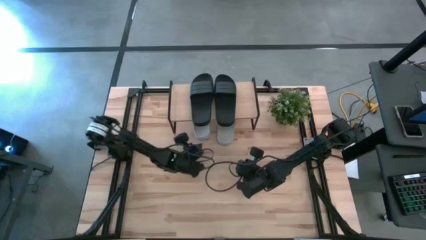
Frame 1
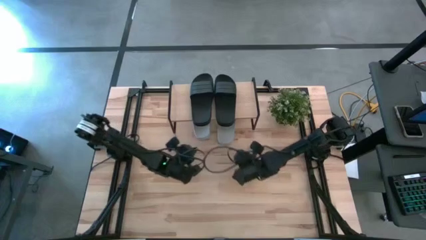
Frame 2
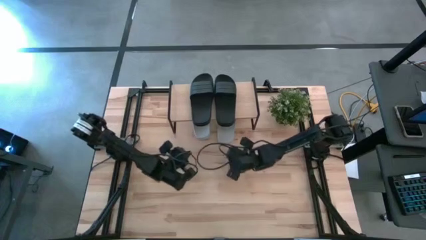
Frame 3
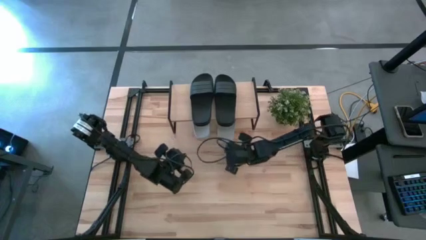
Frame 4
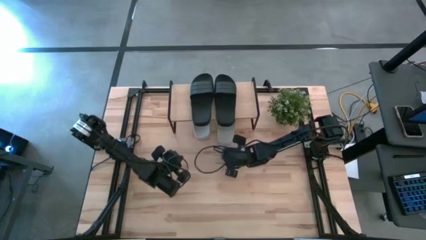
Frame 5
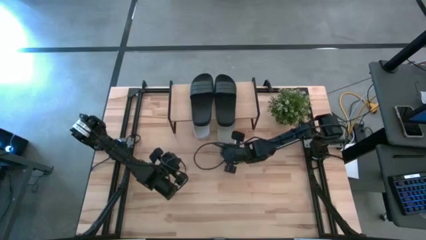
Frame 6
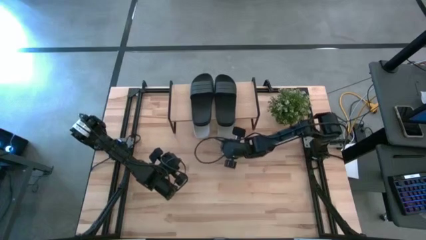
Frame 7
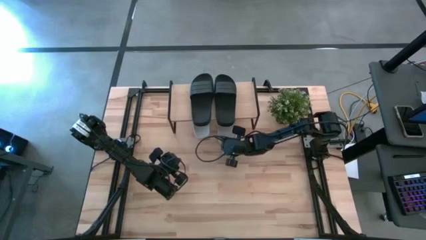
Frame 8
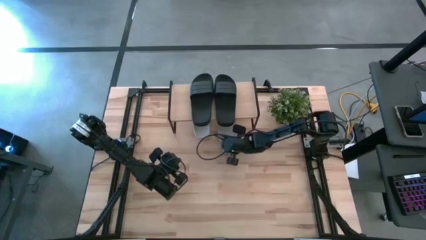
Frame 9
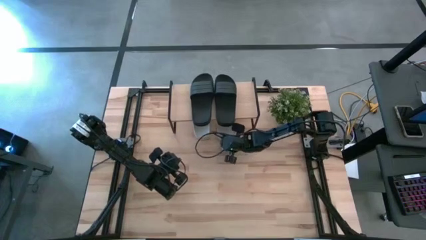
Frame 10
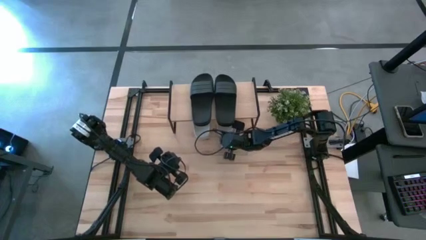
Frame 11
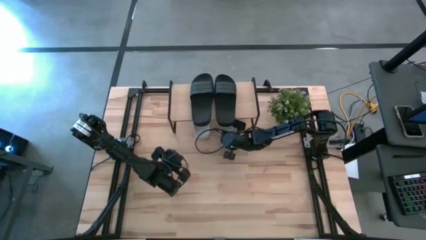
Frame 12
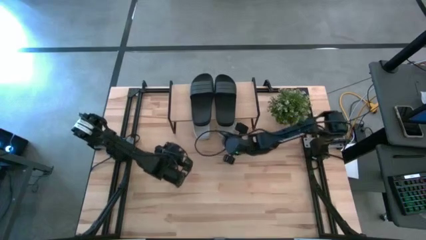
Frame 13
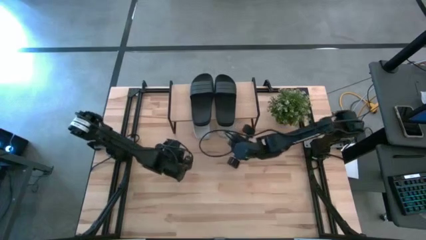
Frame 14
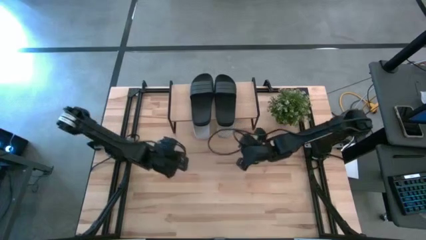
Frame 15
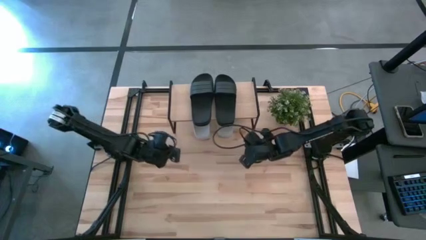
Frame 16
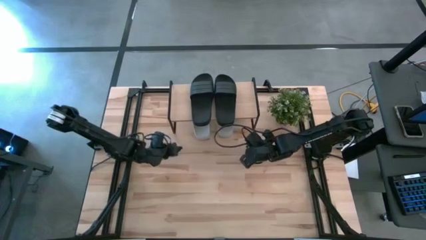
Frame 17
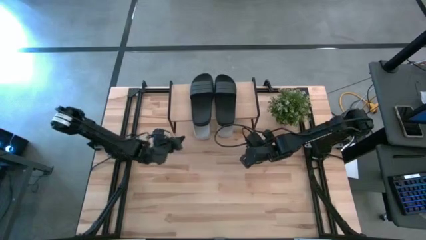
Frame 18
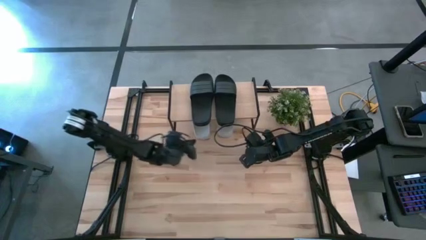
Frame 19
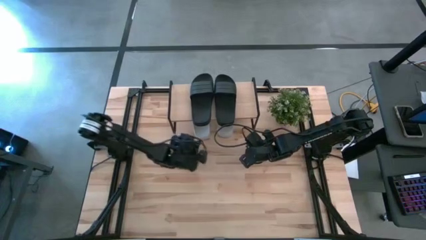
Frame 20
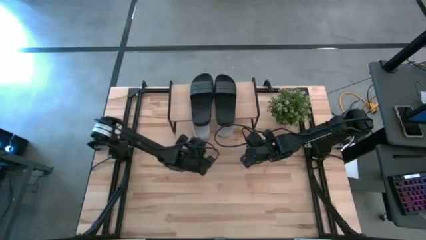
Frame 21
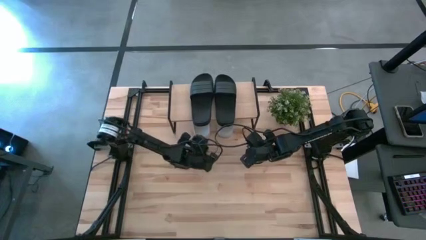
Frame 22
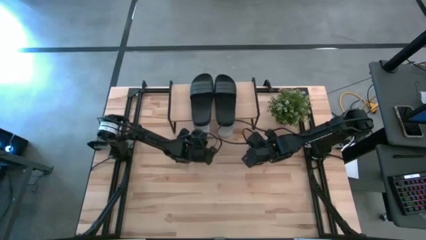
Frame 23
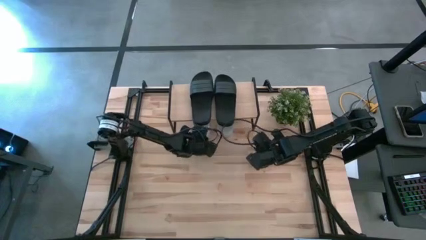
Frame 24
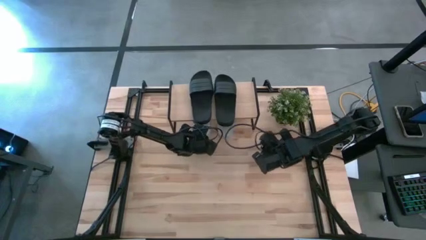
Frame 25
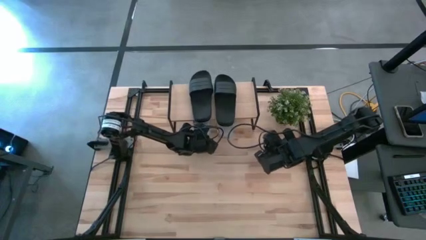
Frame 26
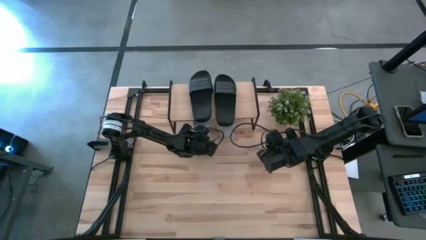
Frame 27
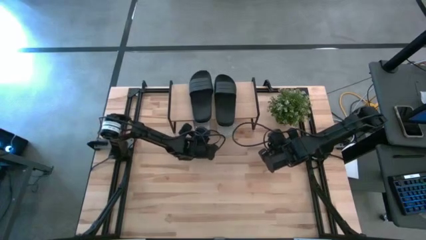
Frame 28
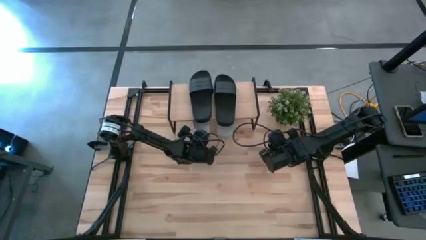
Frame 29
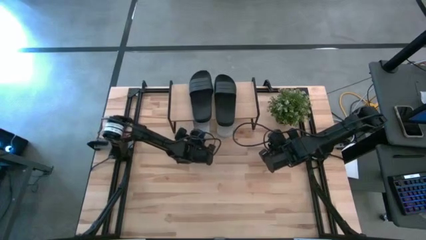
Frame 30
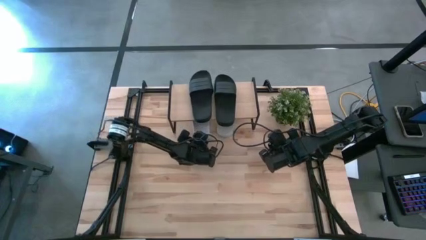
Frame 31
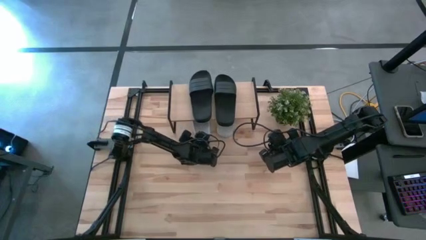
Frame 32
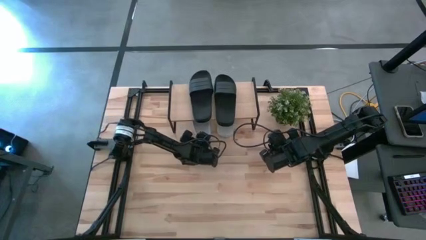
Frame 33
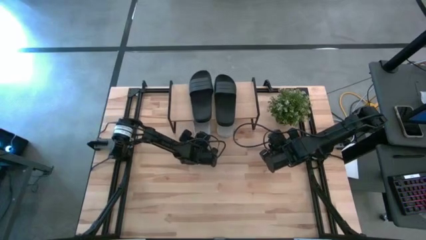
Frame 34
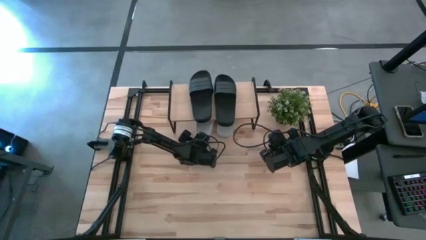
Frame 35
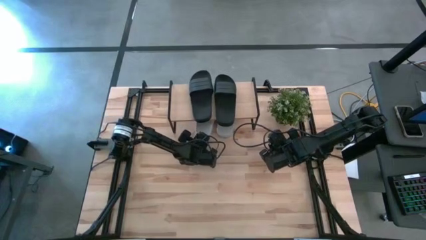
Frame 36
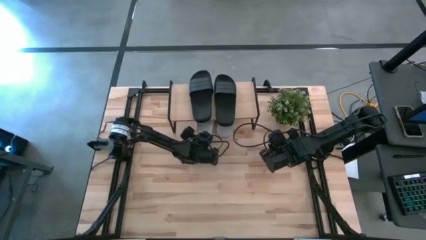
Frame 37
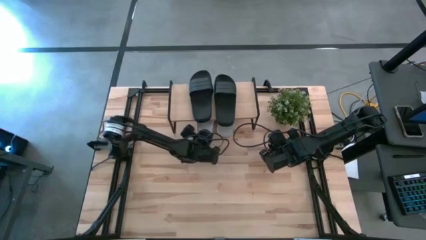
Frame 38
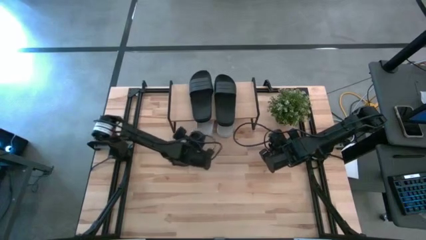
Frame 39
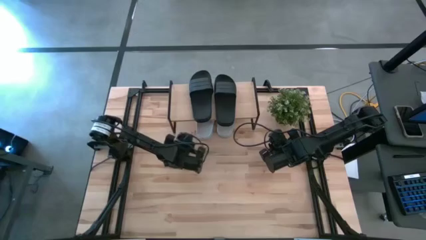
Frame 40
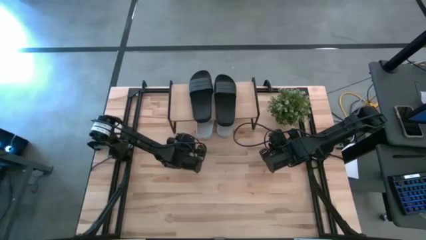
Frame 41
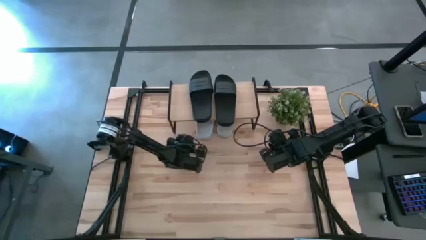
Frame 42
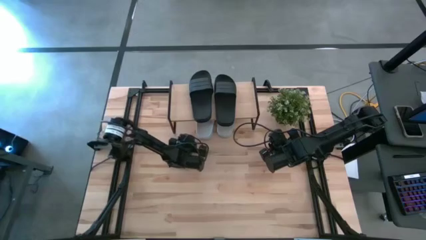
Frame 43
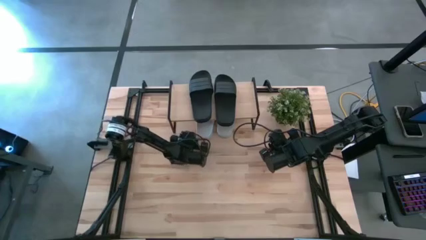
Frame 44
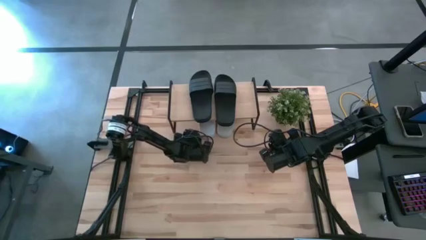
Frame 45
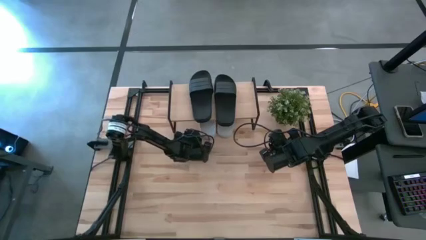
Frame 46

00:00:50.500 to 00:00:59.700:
Task: Pick and place slides into the shelf
Adjust the gray slippers under the shelf

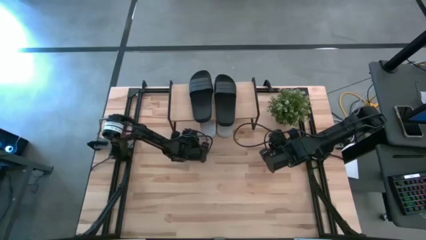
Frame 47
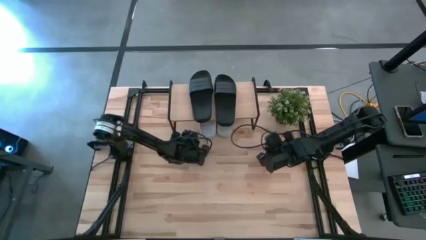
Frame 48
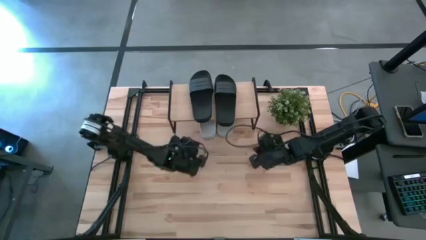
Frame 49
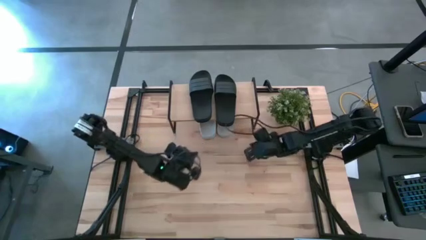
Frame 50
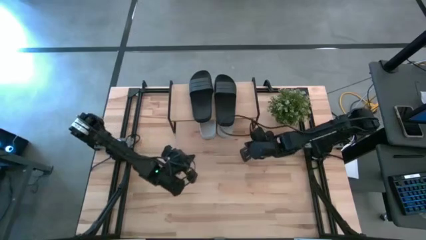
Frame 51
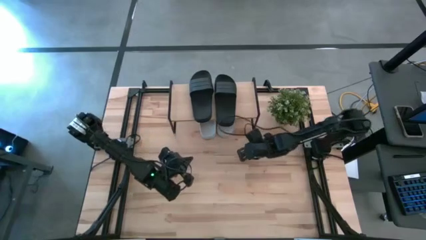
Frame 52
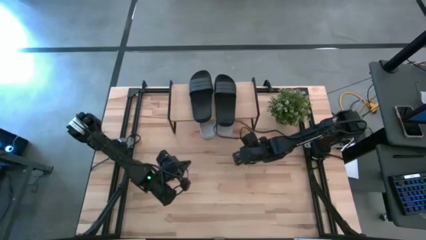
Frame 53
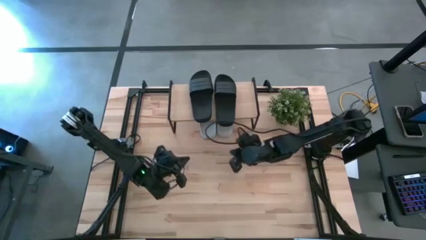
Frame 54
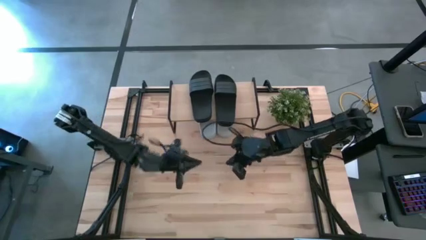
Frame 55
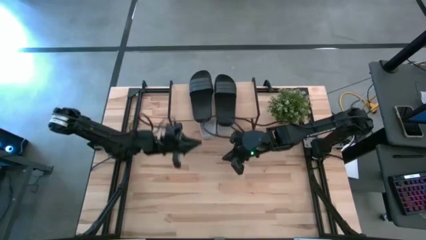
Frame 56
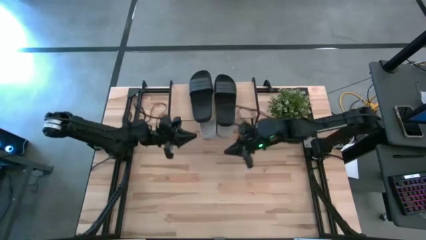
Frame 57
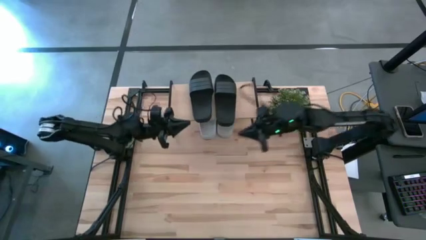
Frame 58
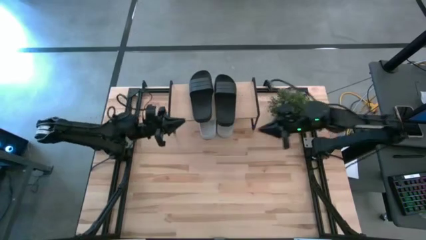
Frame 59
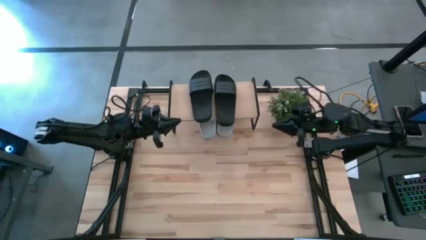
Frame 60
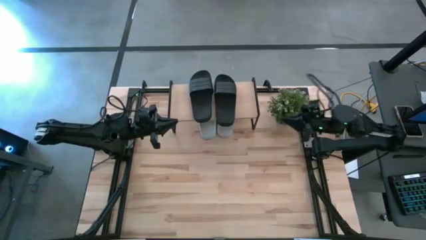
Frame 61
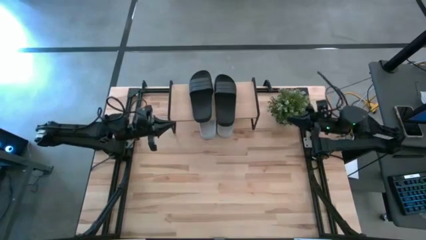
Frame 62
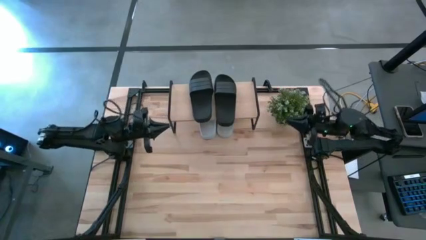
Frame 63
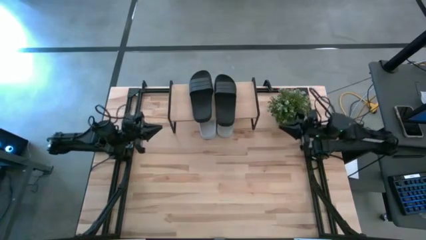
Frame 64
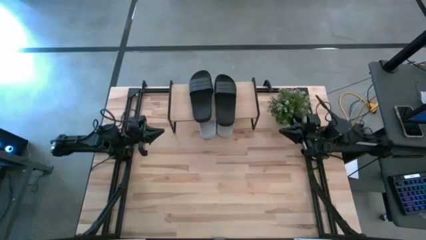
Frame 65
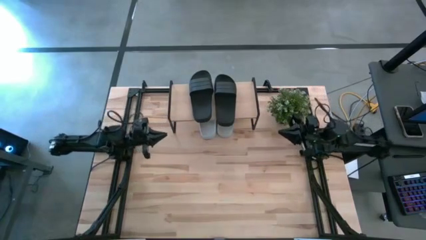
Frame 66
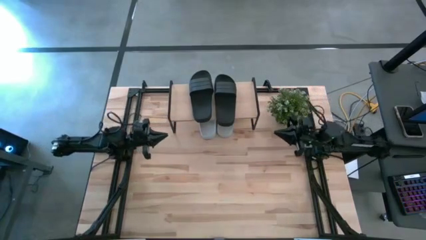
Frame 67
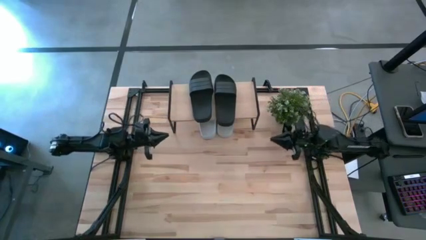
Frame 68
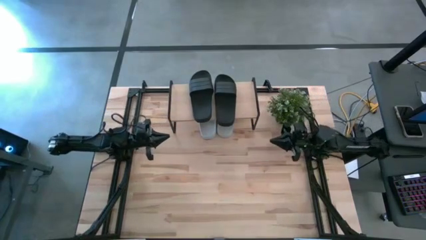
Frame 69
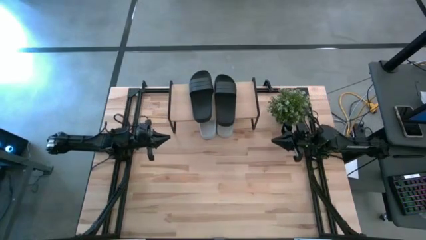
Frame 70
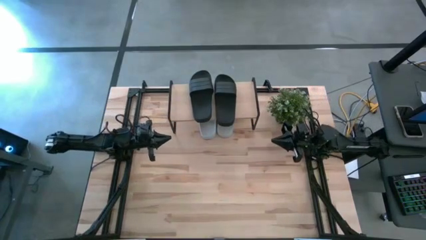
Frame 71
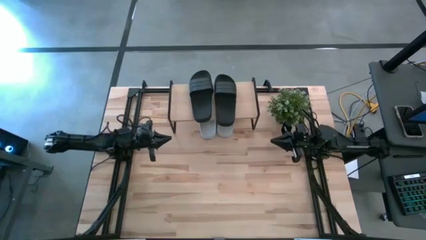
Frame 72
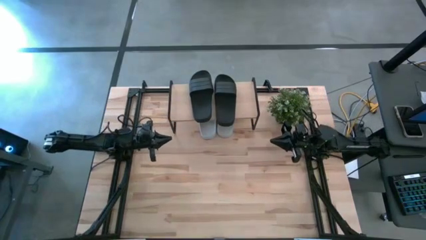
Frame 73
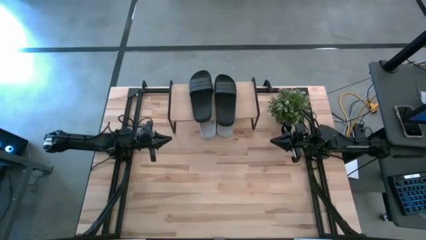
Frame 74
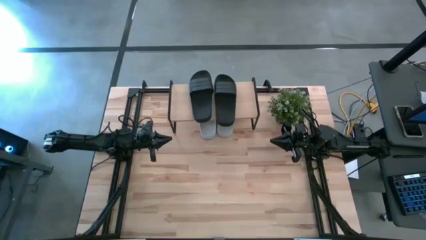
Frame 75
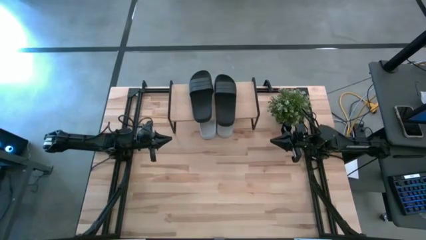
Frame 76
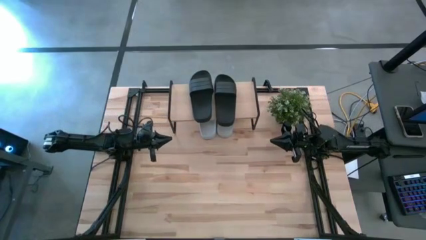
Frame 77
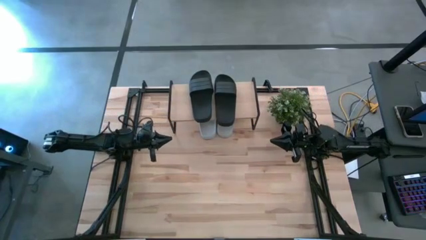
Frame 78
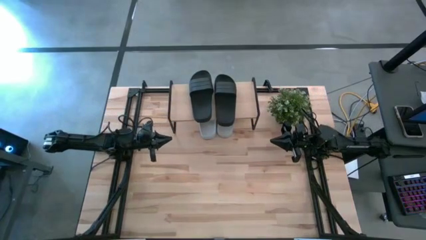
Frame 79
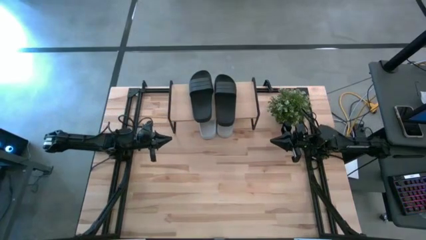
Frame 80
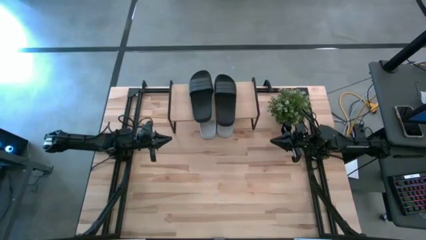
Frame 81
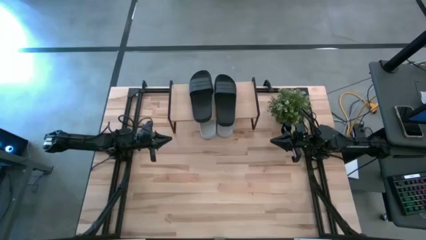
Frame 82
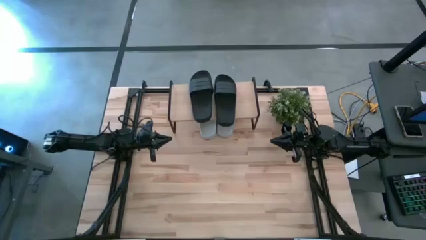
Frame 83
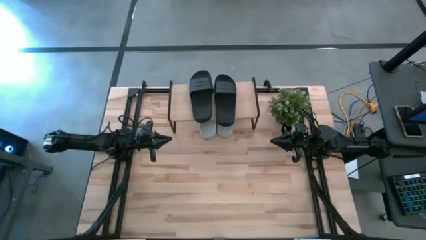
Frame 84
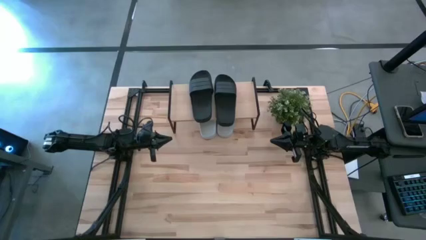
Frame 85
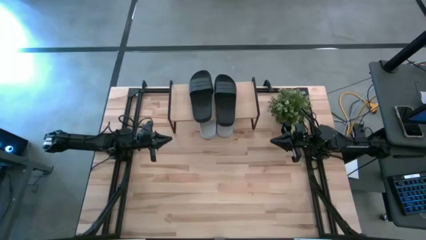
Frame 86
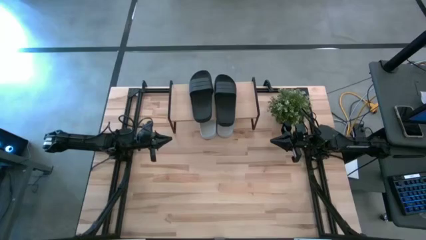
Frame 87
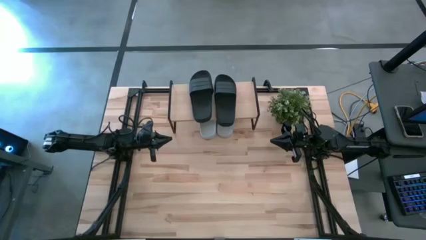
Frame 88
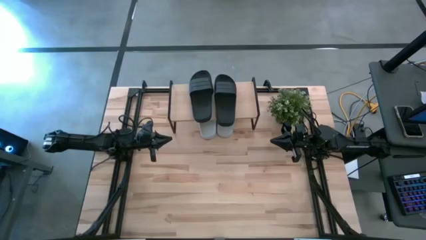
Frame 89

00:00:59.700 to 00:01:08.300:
Return to Home Position
